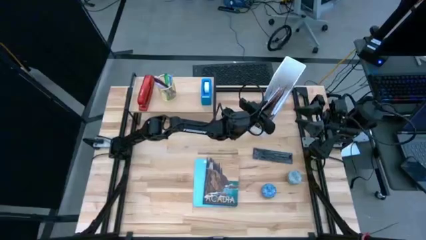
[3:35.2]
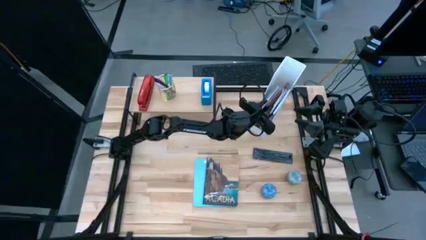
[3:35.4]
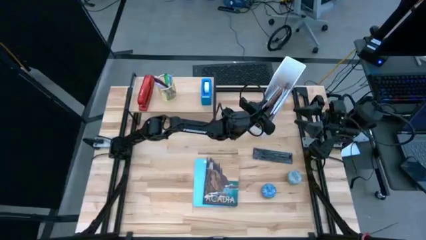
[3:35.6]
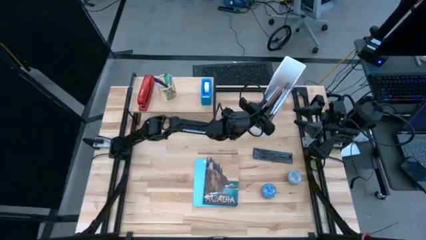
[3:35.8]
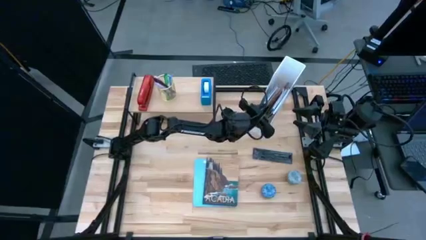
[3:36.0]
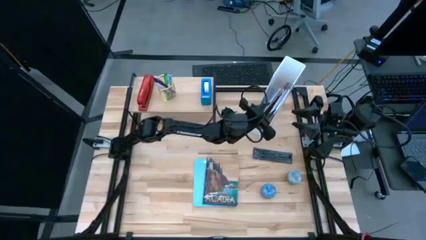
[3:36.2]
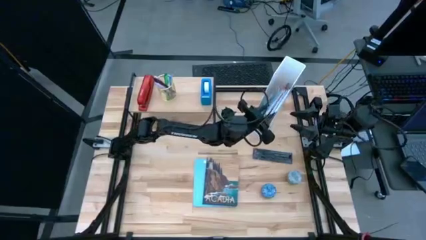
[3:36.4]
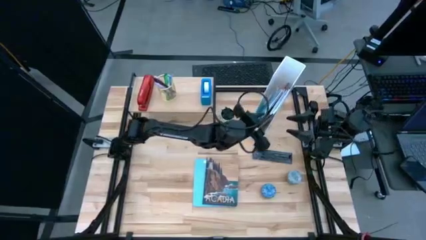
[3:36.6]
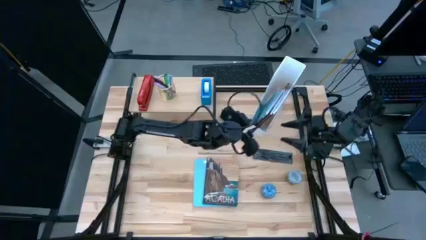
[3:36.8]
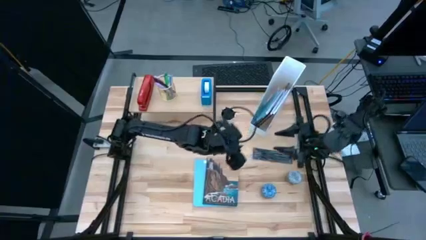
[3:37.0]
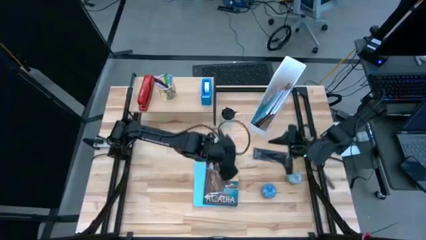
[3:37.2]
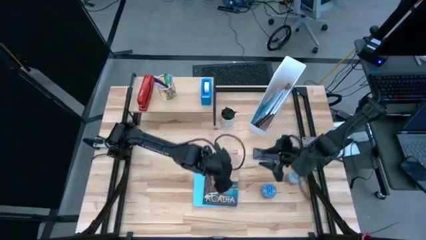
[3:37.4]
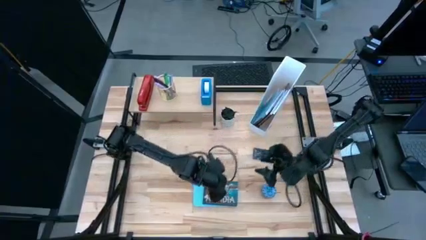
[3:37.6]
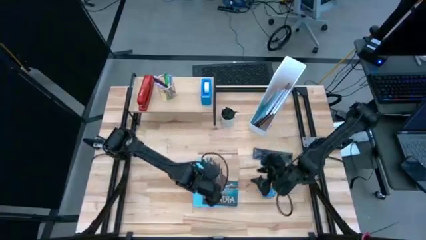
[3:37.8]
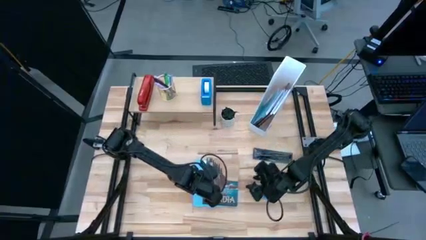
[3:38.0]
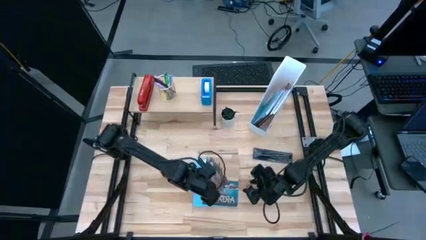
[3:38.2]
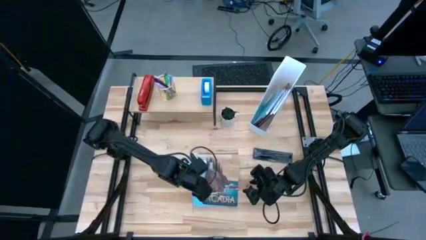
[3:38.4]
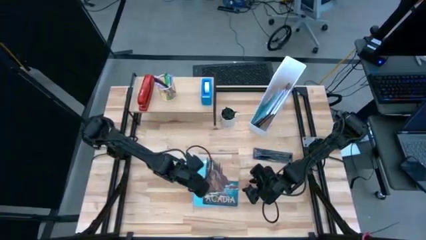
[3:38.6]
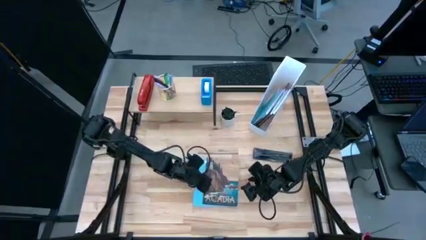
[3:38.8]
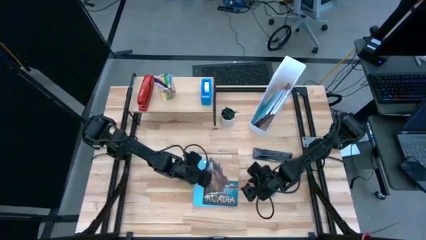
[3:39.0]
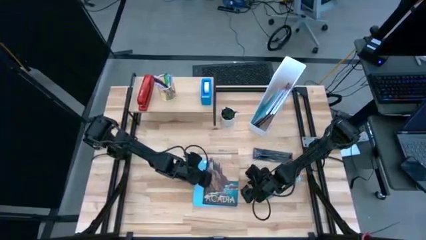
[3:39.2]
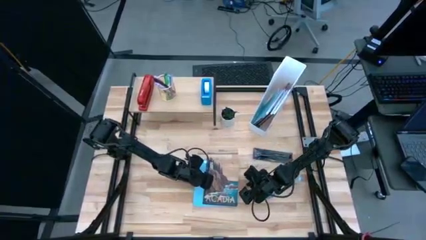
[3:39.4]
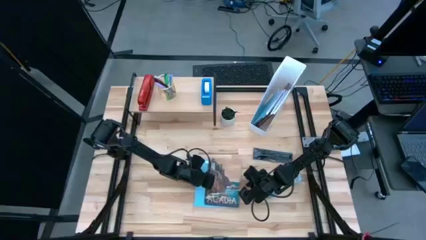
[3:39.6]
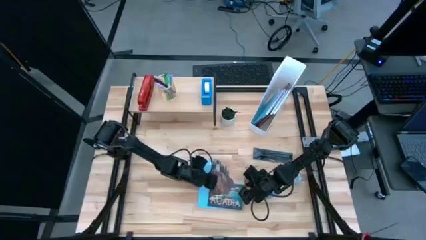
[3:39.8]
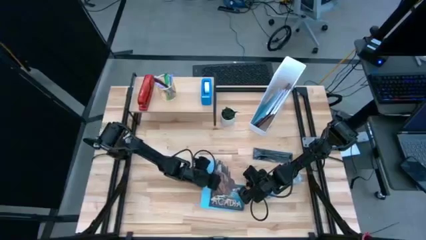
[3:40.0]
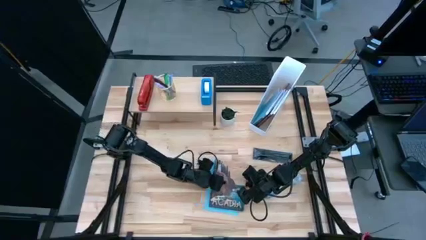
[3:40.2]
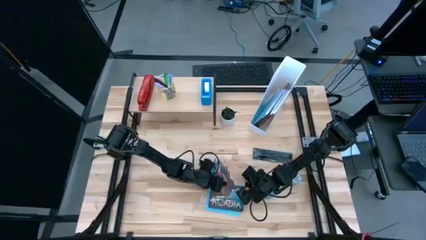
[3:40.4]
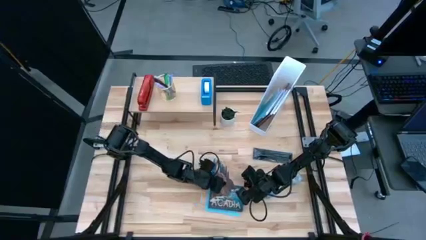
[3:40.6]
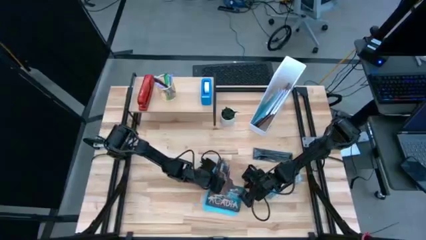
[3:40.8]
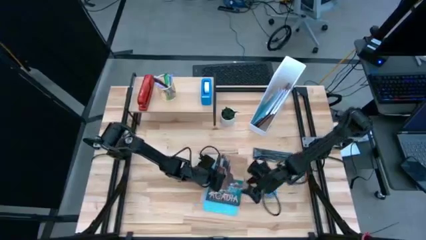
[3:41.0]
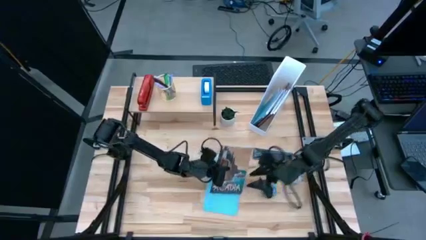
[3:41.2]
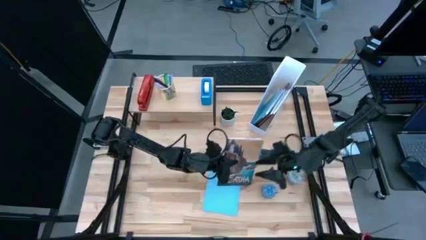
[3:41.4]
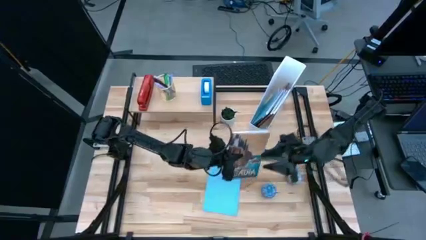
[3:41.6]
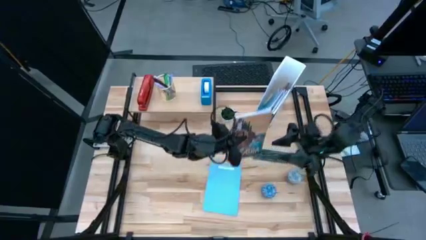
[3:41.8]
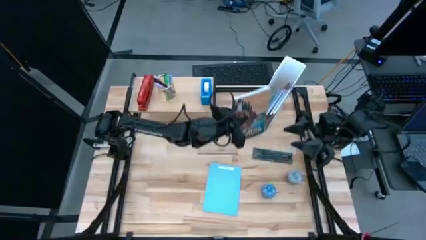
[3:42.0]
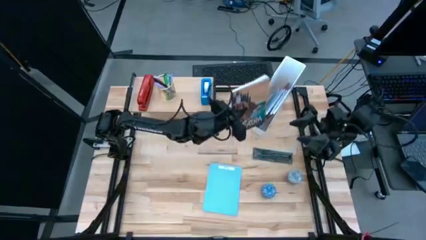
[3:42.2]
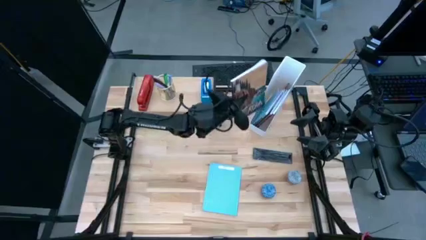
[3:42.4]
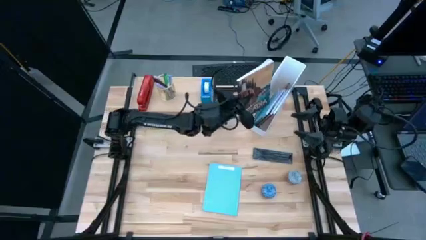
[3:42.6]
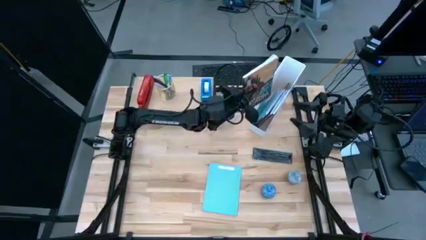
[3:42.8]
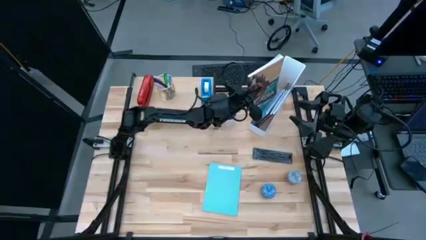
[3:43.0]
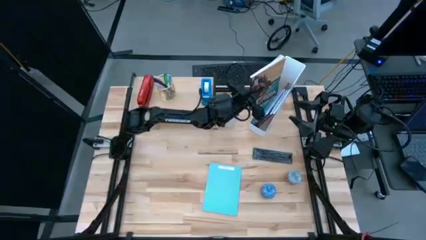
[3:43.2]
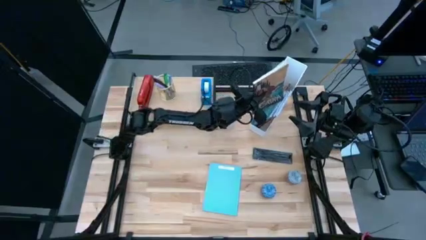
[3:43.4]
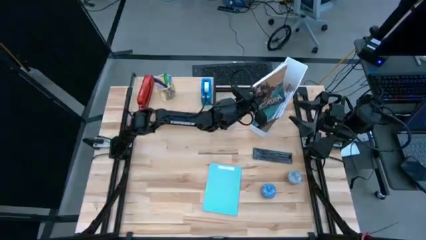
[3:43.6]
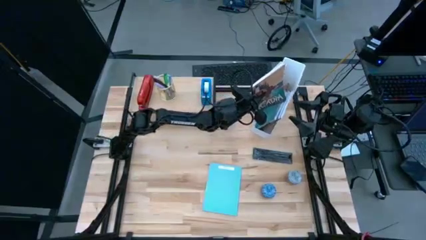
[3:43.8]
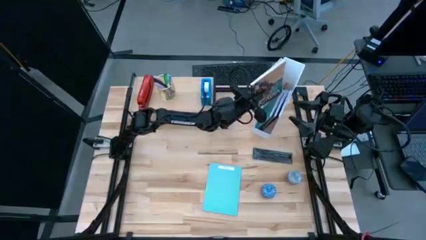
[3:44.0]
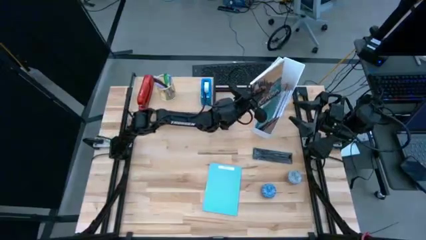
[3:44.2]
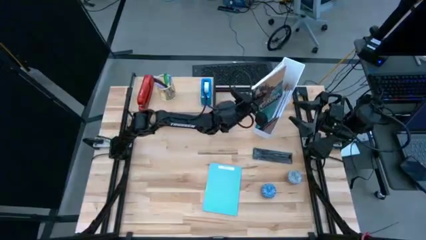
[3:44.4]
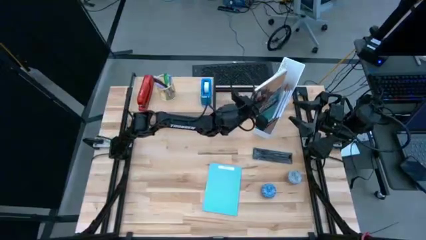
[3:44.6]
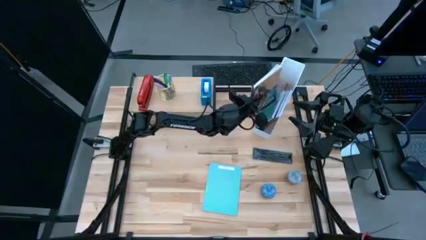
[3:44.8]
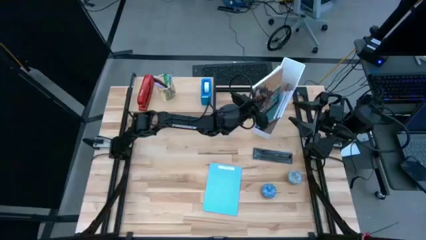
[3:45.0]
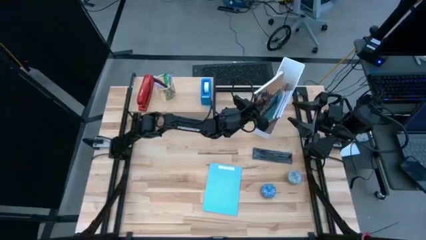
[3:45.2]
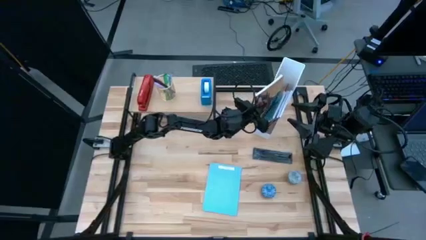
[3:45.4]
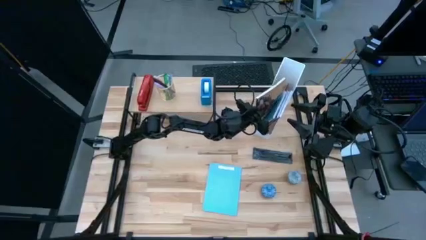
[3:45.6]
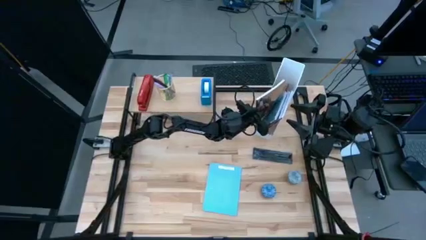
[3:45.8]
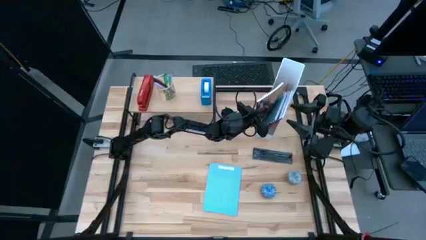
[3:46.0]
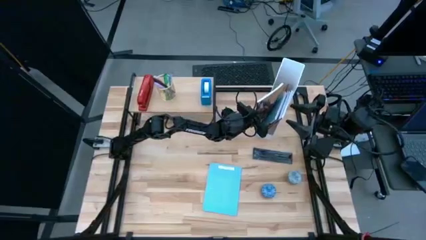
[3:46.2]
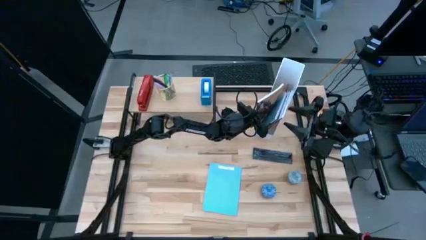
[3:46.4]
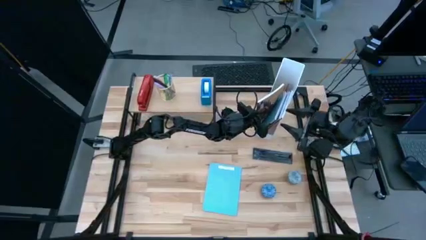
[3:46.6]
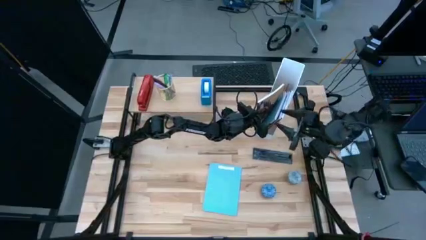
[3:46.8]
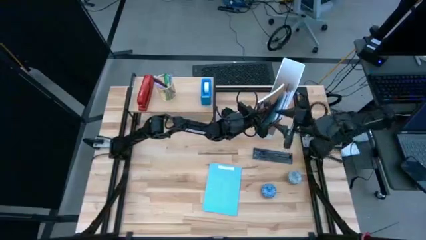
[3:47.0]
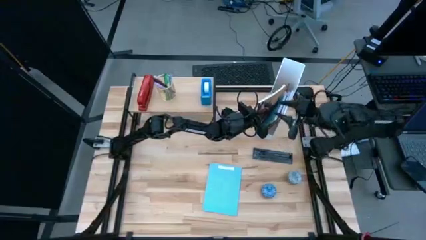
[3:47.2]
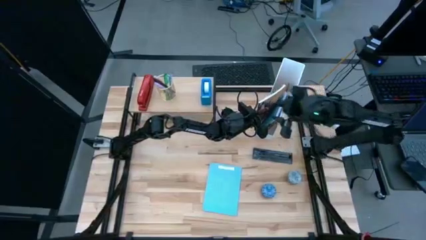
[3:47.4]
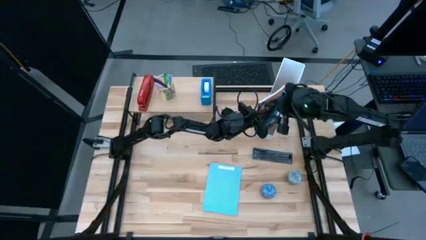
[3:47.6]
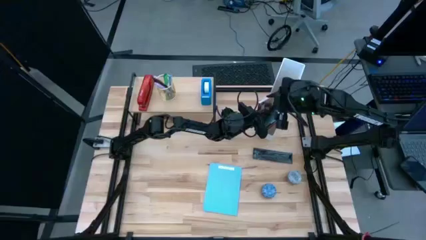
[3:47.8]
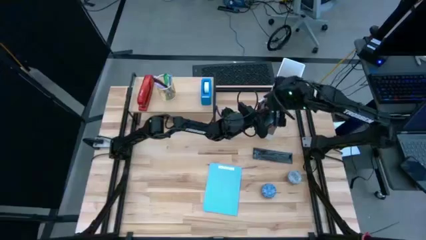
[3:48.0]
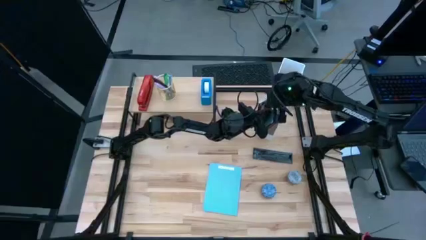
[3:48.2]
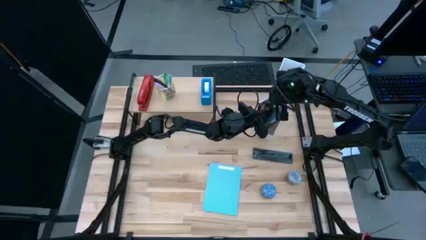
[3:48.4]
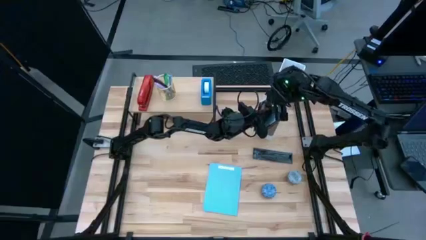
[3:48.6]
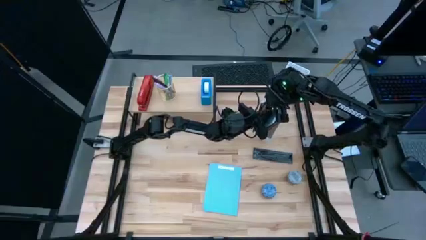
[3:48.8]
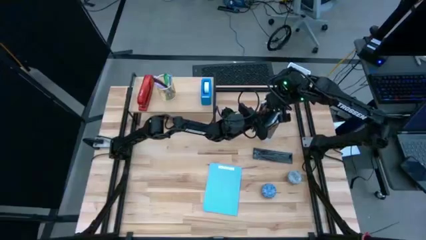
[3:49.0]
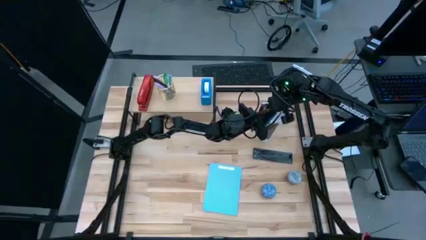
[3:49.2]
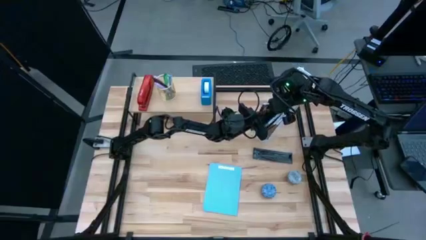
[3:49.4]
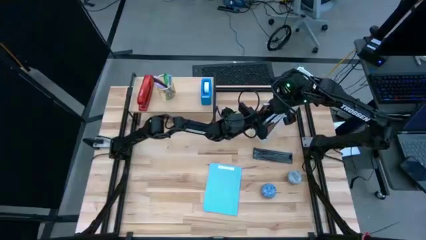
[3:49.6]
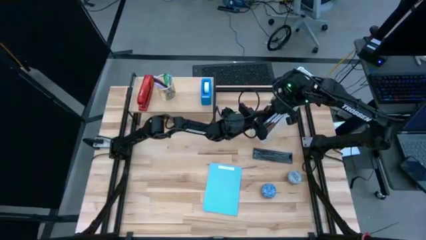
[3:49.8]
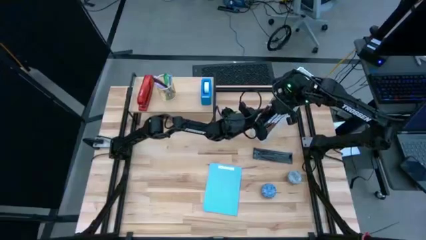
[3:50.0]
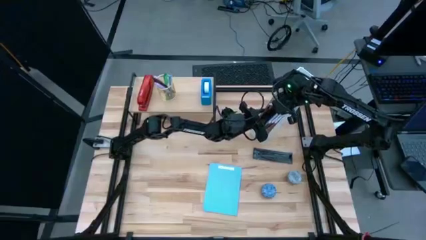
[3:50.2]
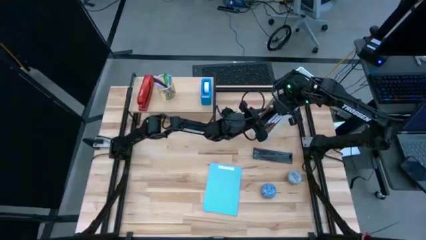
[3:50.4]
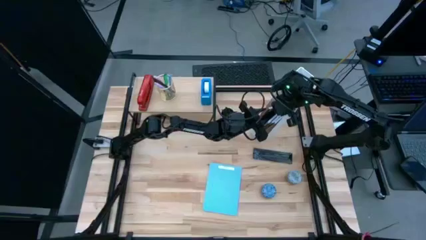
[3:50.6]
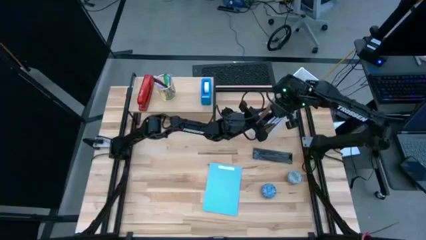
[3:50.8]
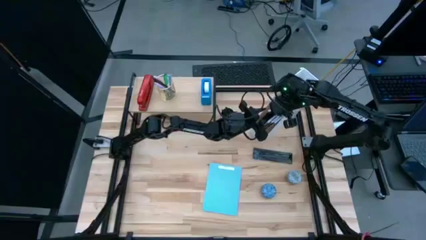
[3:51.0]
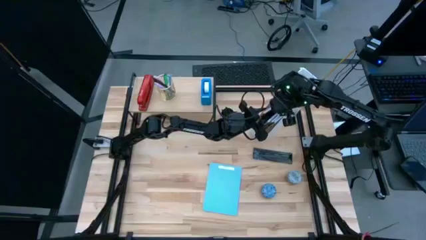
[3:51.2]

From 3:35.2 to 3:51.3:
Task: Stock shelves
Put the blue/brown book into the white book shelf

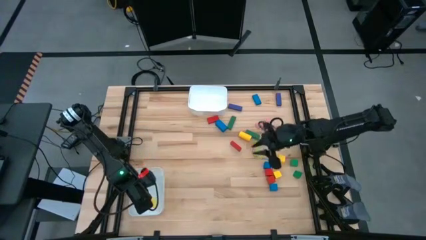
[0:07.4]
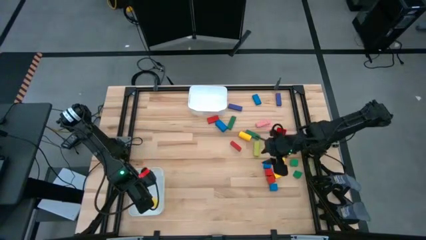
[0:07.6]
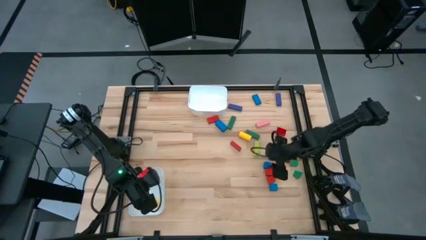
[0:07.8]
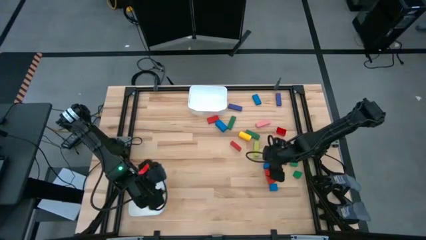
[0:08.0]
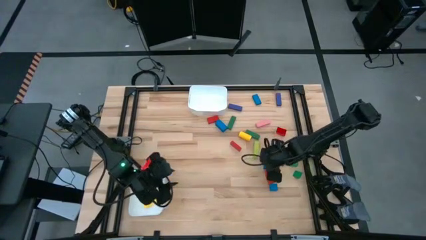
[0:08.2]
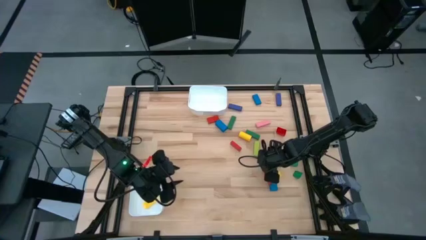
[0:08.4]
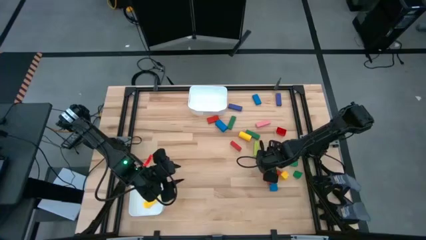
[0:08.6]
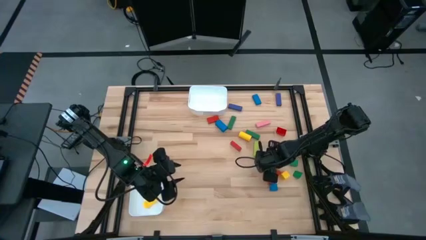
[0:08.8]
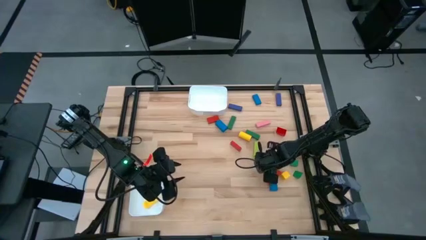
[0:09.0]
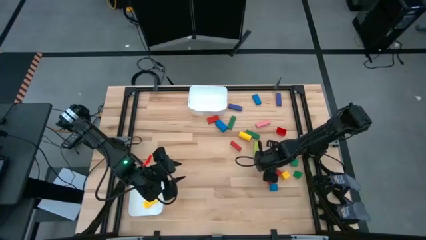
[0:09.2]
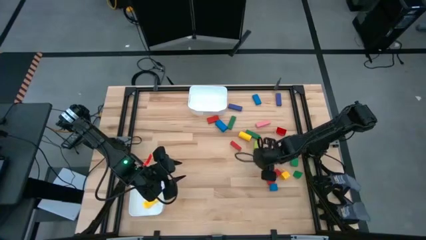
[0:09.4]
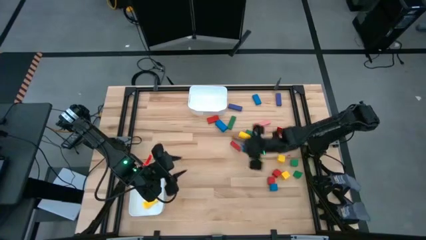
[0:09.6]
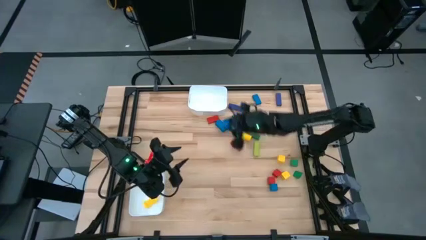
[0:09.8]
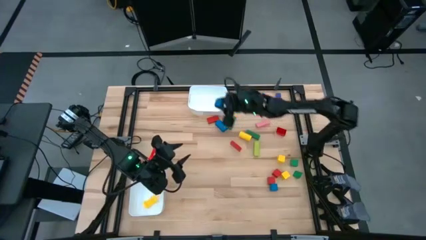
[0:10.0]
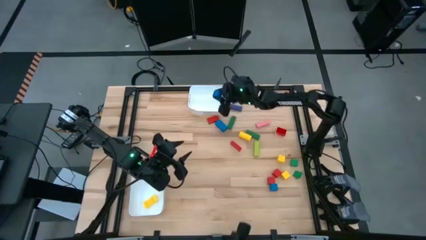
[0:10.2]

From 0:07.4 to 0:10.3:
Task: Sort blocks by size
Put the blue cube block into the top white bin
